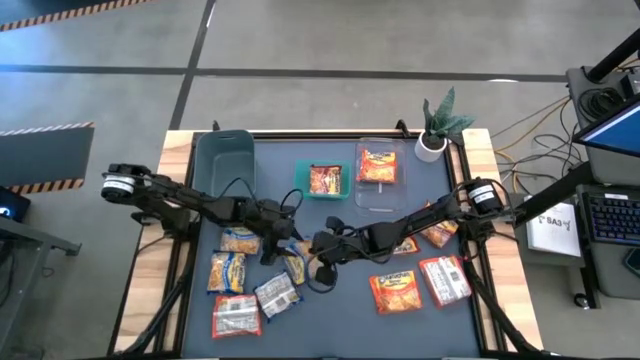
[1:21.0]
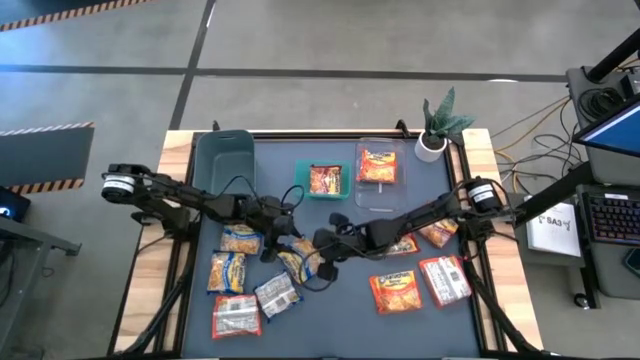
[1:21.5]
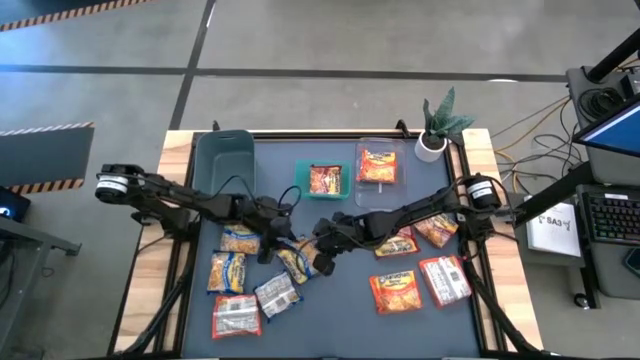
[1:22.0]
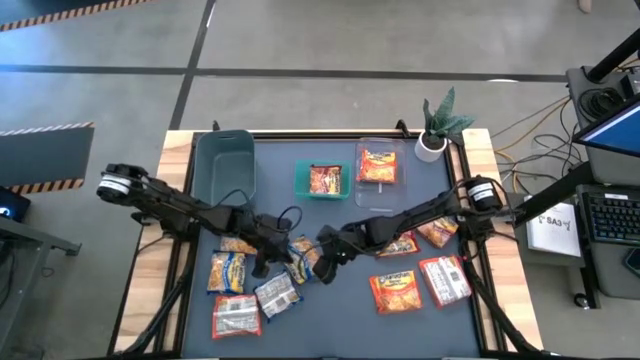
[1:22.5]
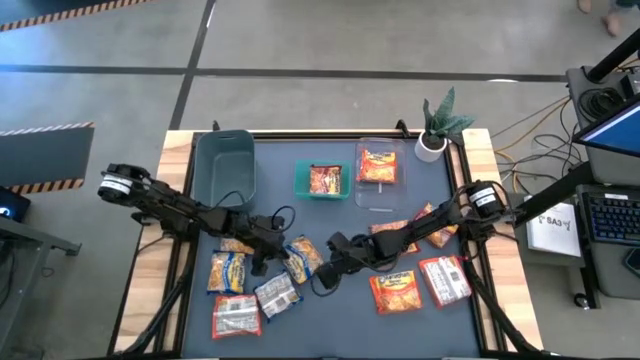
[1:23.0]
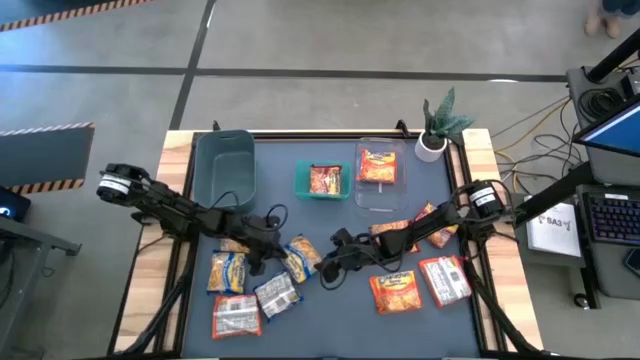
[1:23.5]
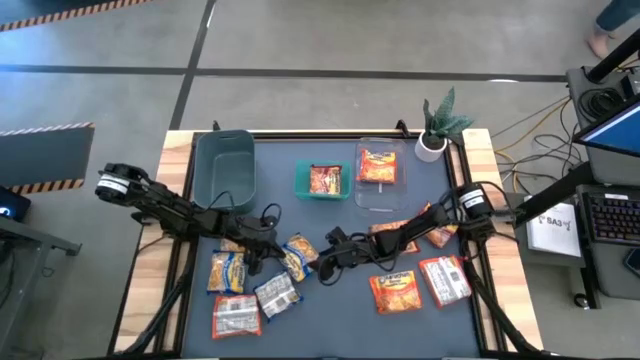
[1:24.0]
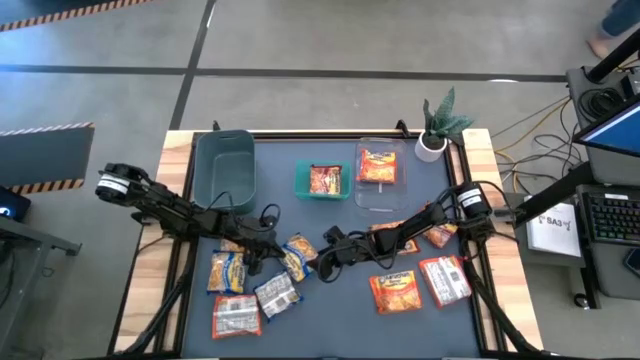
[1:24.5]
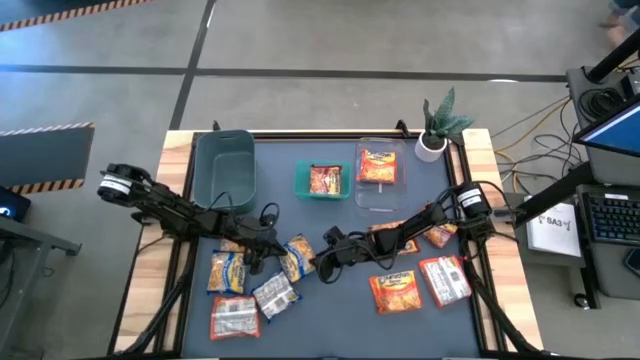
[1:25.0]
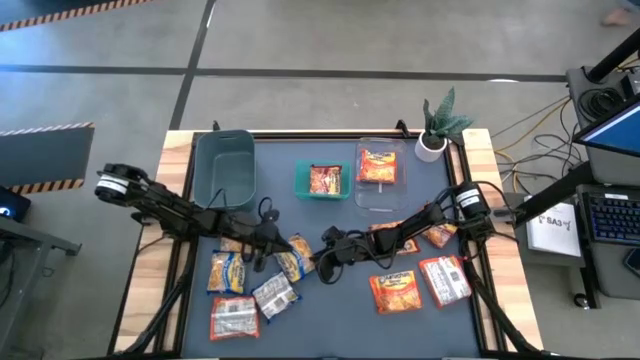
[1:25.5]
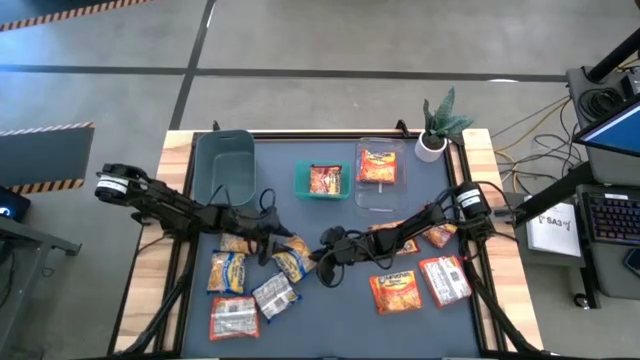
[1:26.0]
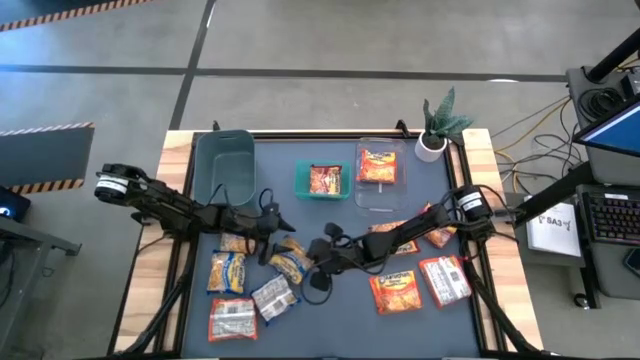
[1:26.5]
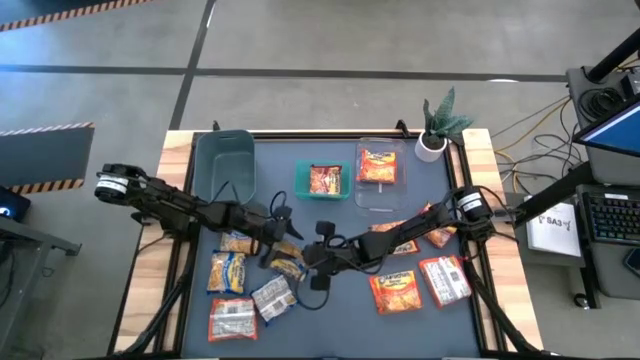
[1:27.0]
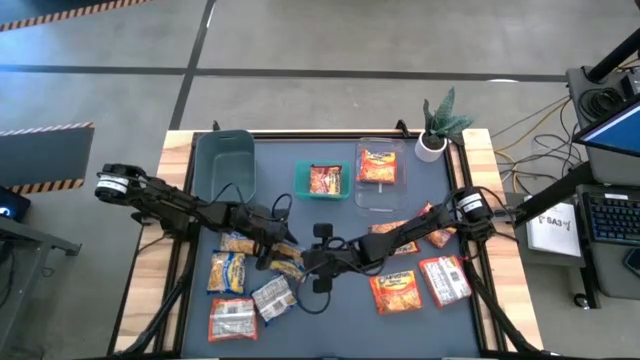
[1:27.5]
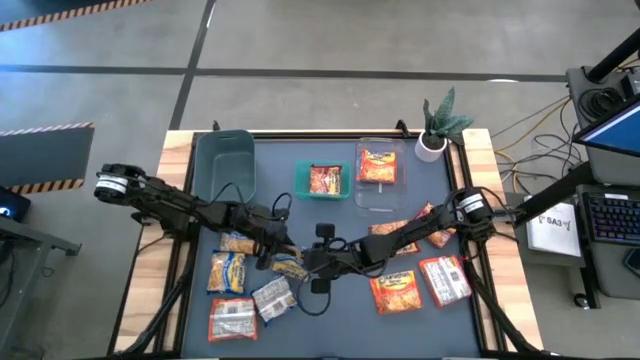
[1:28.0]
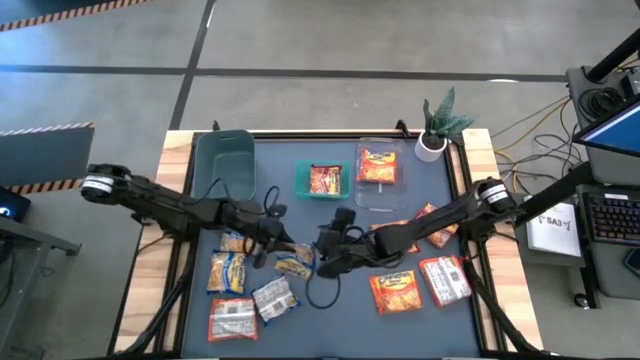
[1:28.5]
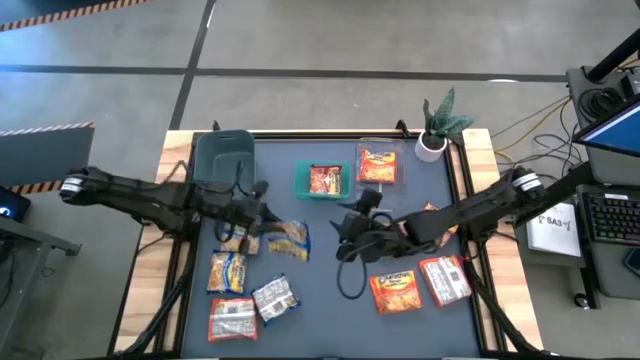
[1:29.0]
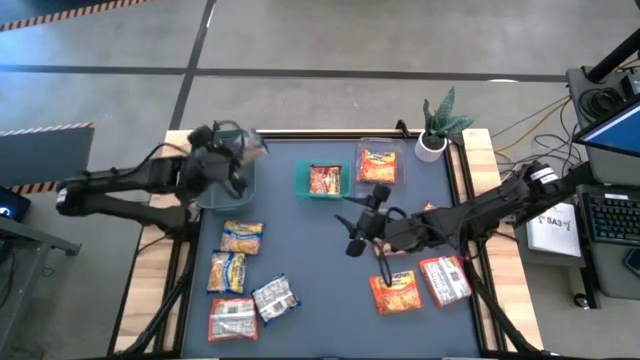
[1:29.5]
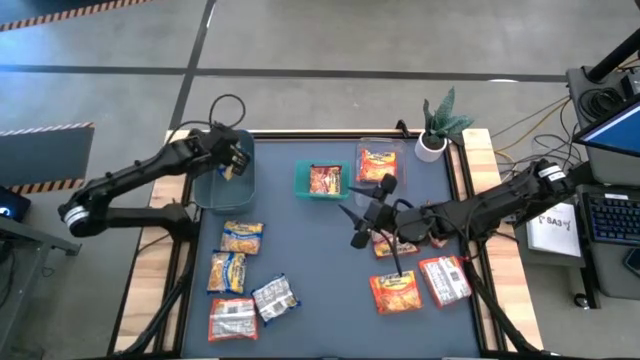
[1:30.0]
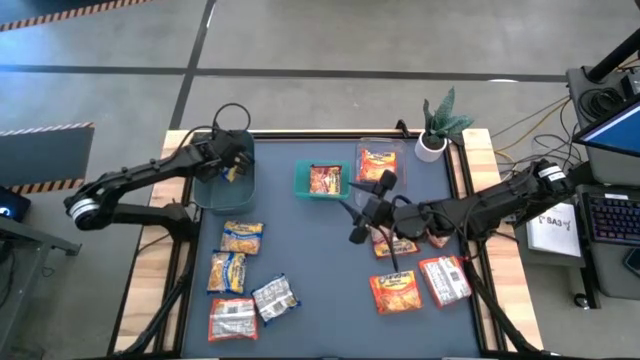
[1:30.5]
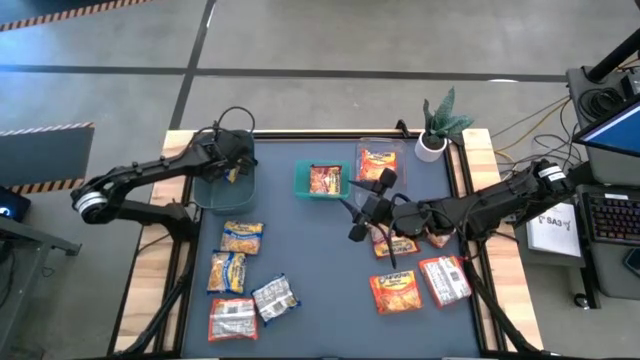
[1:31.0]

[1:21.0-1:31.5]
Task: Sort Maruchan noodles
Put the blue noodle pack into the dark blue bin

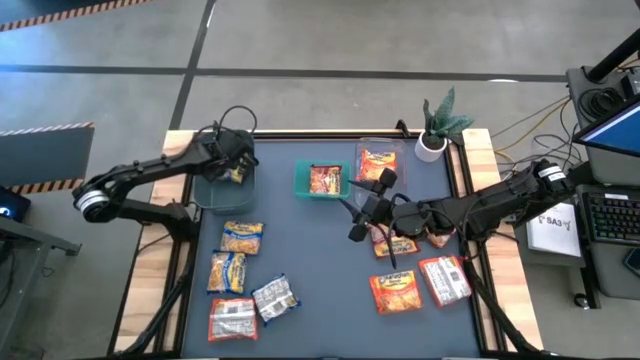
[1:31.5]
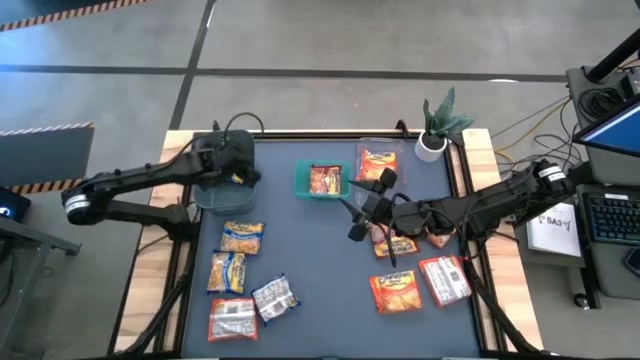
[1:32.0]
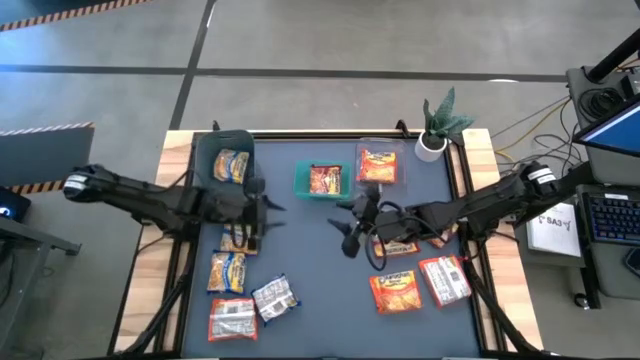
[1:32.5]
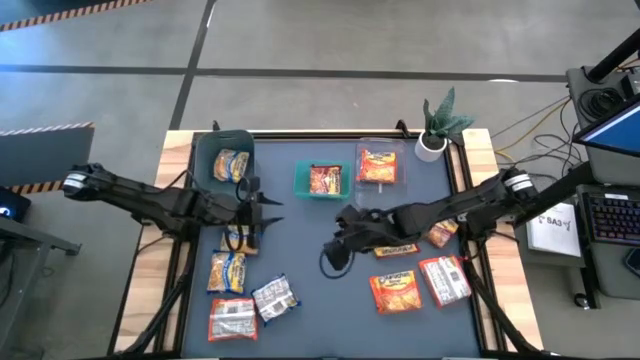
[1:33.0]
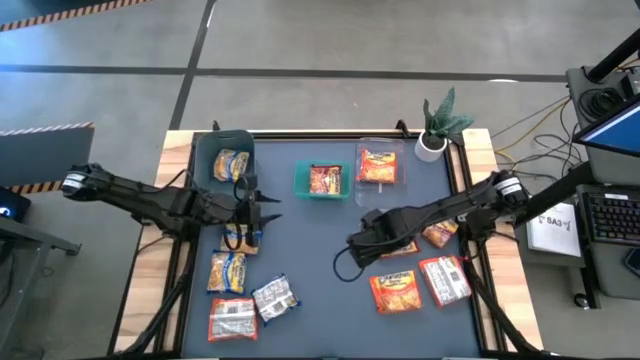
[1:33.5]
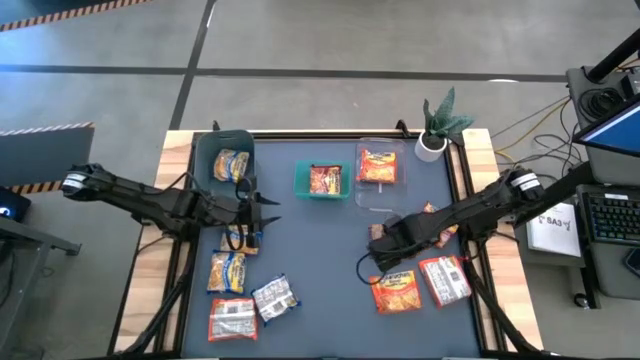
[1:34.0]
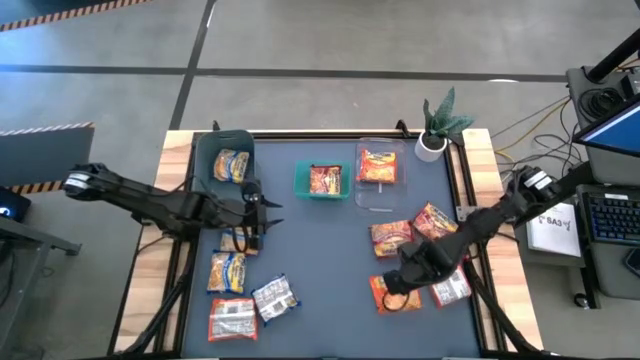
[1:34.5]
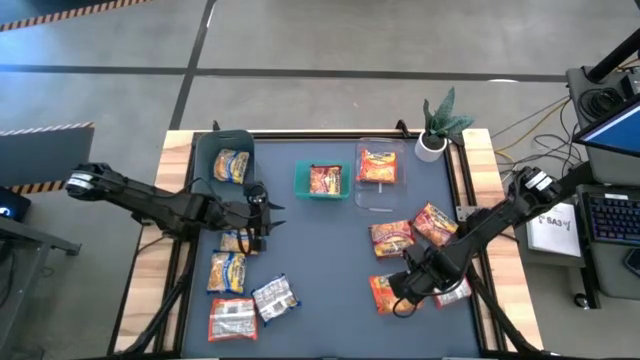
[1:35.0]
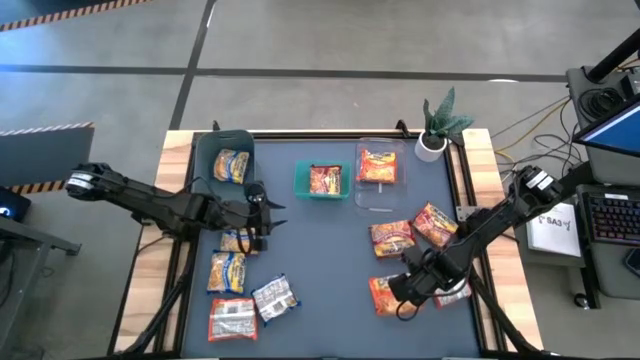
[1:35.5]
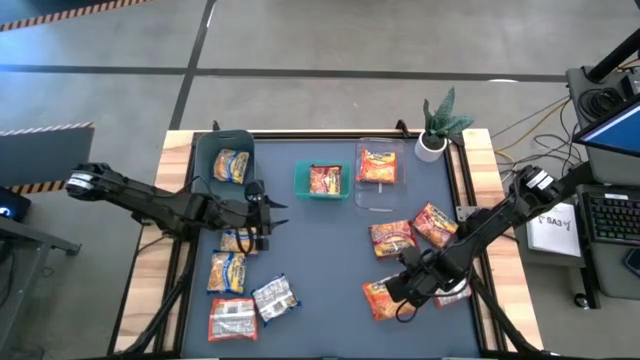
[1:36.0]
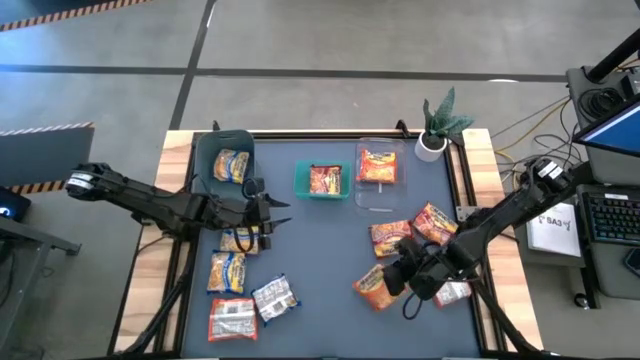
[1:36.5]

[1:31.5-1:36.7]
Put the orange noodle pack into the transparent bin

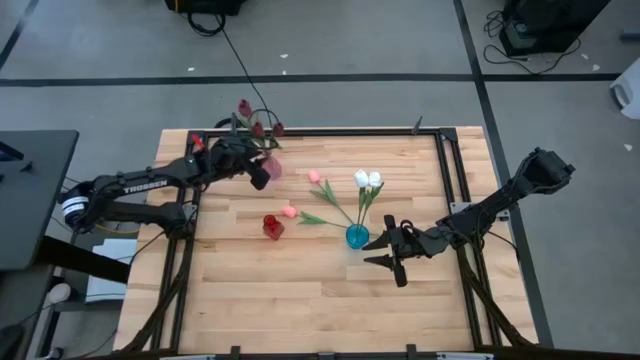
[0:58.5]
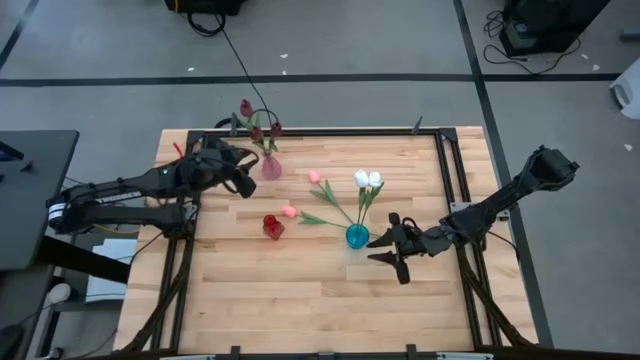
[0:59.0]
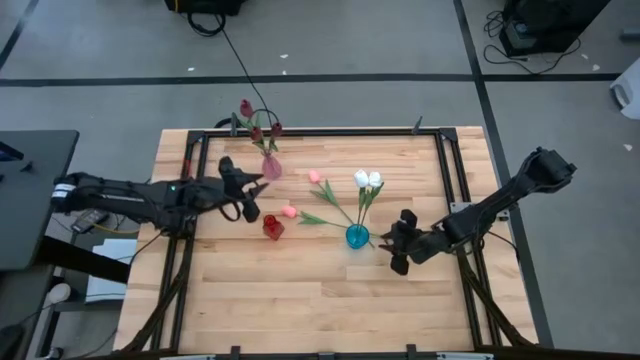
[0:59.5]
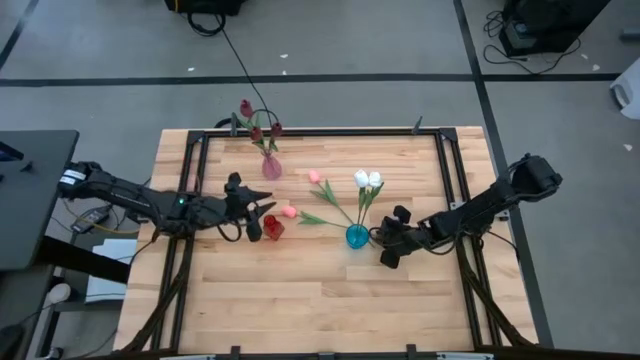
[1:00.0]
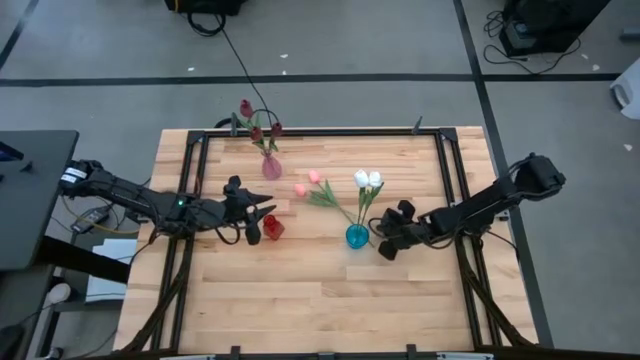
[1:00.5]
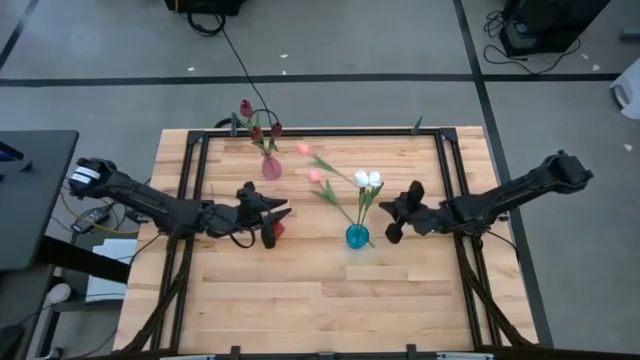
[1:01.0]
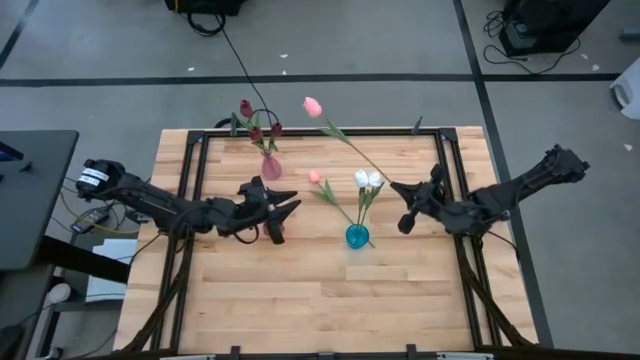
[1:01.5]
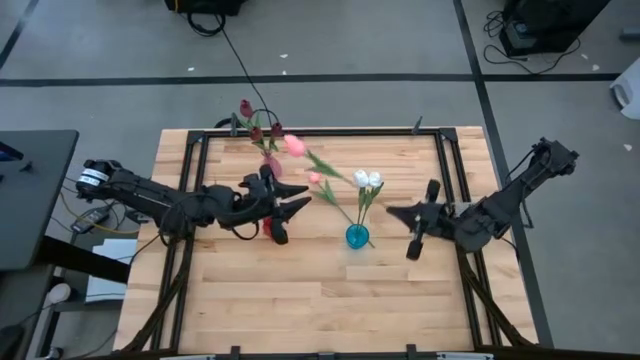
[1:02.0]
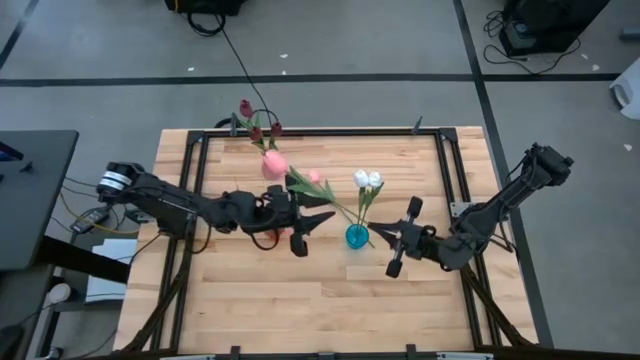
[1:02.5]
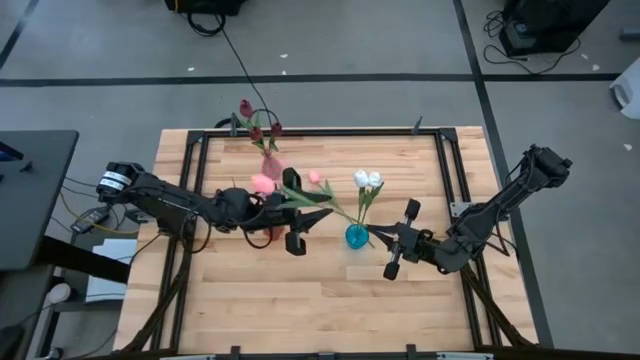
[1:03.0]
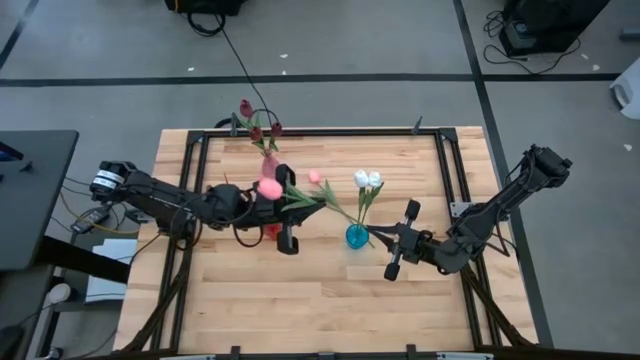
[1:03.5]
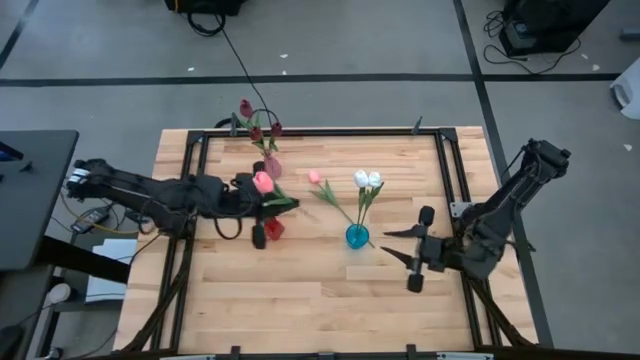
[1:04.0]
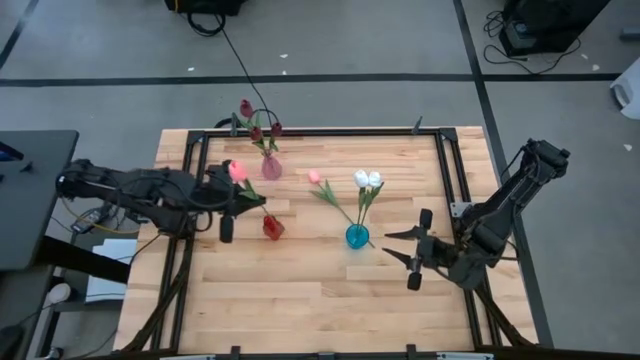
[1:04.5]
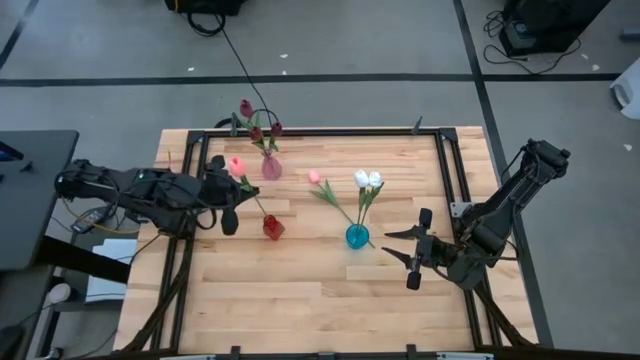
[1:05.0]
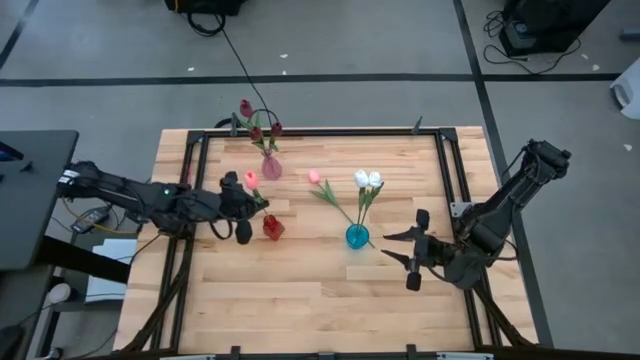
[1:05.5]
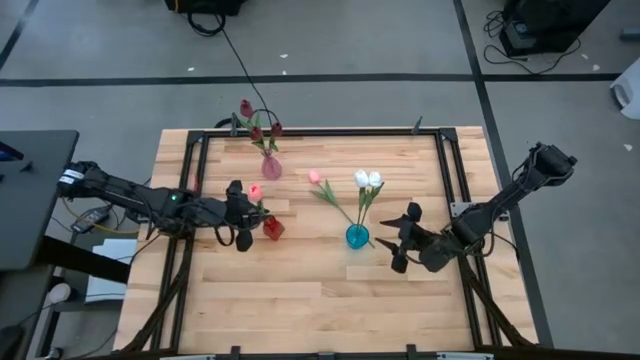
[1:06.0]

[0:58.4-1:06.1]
Task: Sort flowers into vase by color
Put the bottom pink tulip into the red vase
